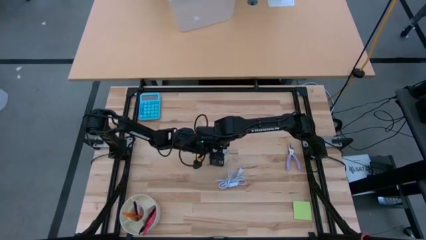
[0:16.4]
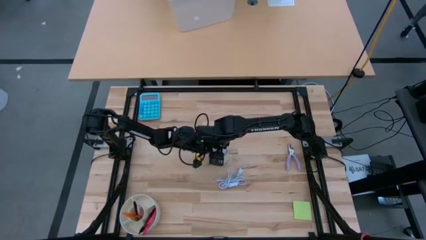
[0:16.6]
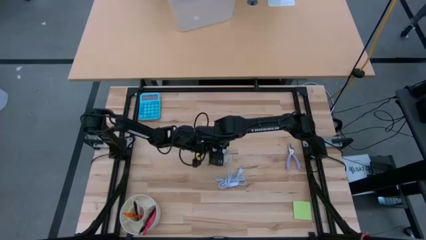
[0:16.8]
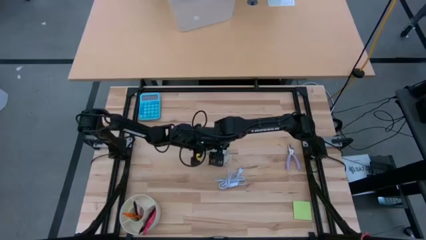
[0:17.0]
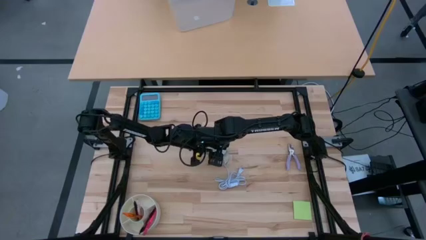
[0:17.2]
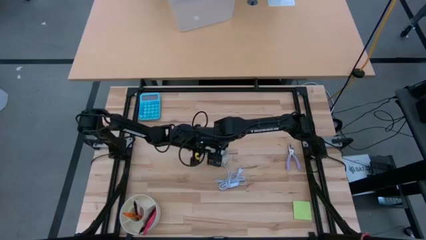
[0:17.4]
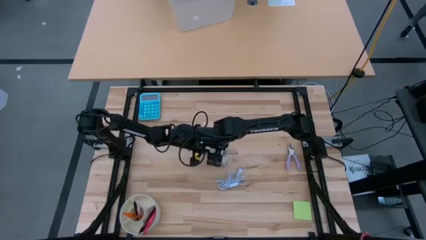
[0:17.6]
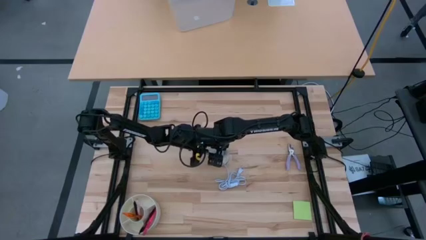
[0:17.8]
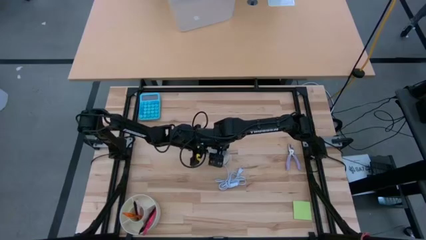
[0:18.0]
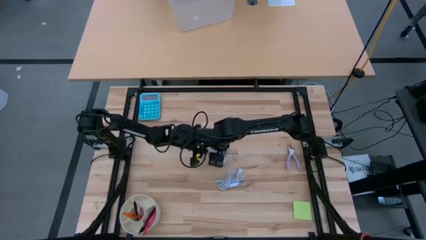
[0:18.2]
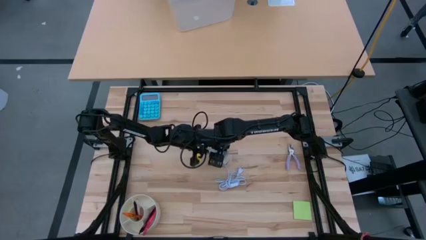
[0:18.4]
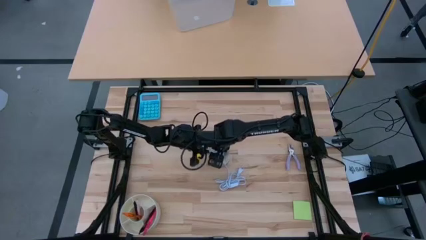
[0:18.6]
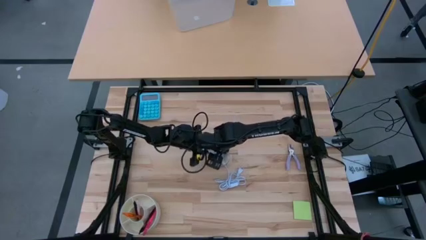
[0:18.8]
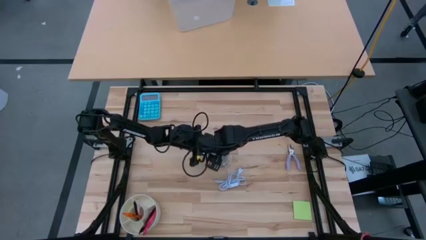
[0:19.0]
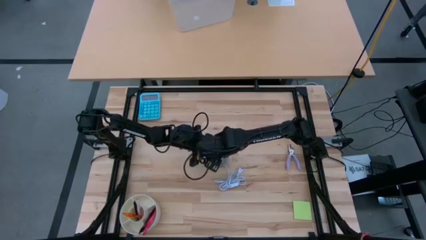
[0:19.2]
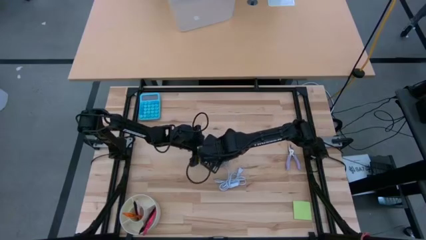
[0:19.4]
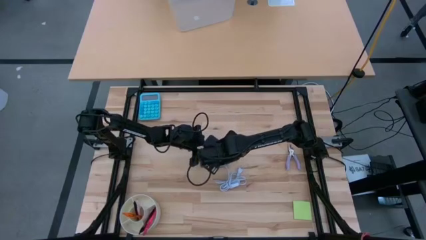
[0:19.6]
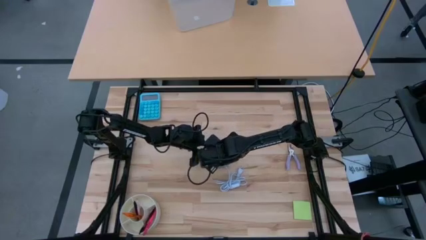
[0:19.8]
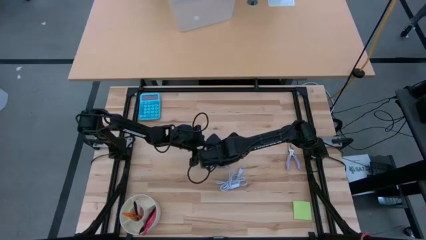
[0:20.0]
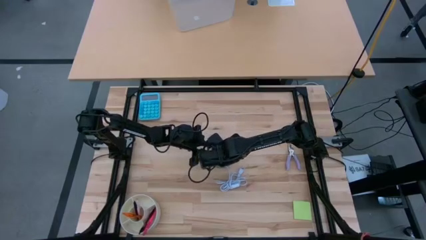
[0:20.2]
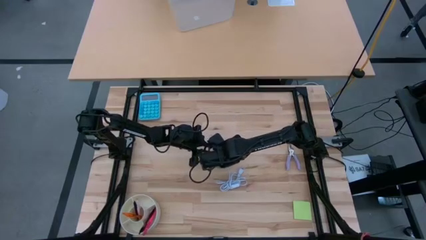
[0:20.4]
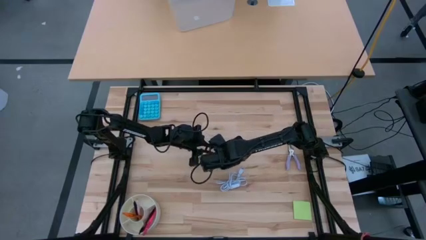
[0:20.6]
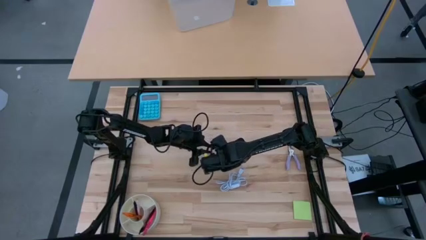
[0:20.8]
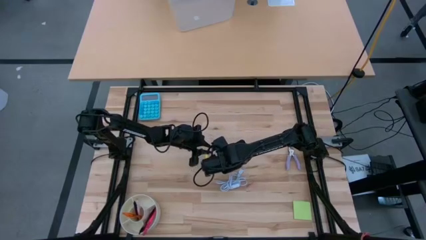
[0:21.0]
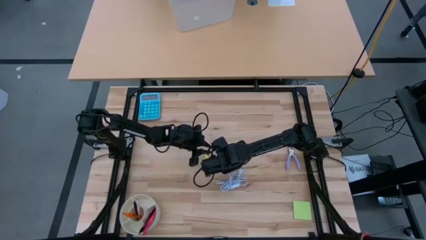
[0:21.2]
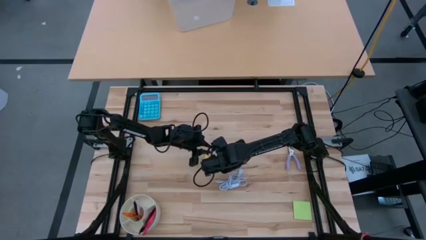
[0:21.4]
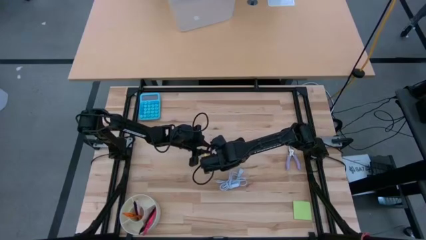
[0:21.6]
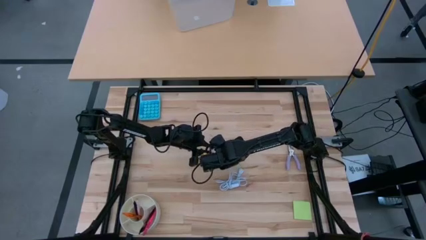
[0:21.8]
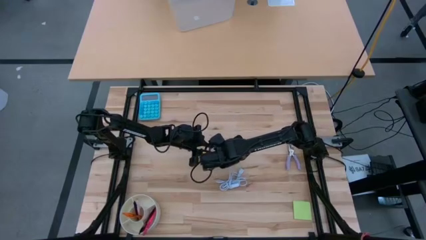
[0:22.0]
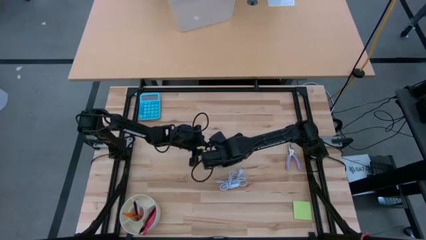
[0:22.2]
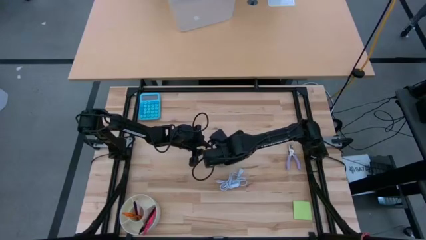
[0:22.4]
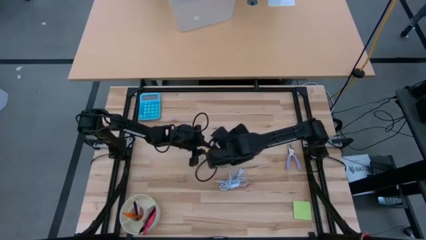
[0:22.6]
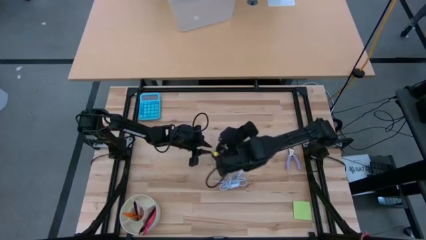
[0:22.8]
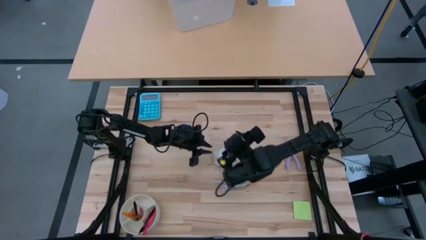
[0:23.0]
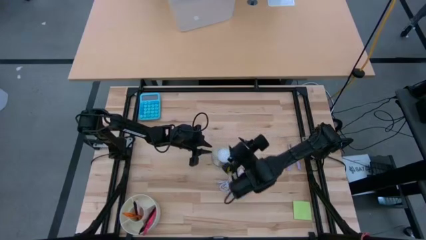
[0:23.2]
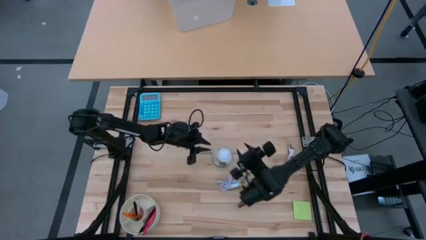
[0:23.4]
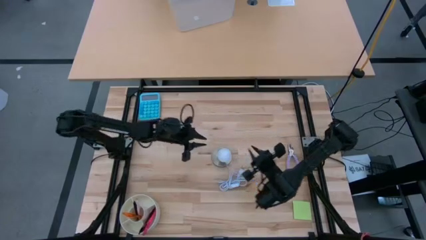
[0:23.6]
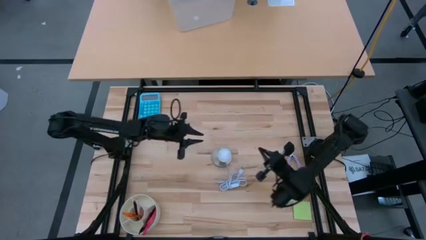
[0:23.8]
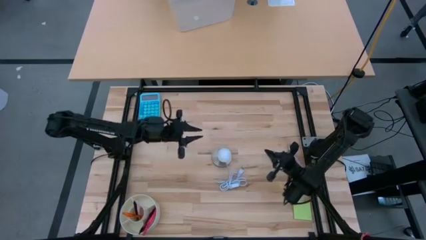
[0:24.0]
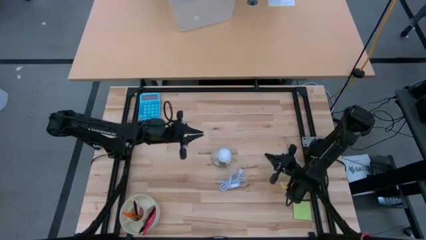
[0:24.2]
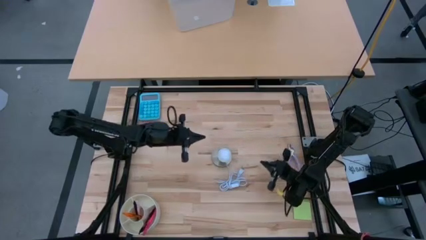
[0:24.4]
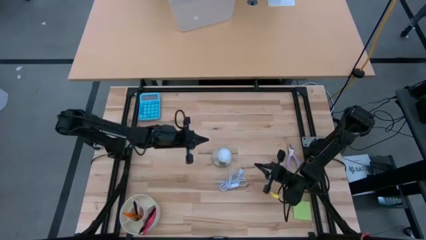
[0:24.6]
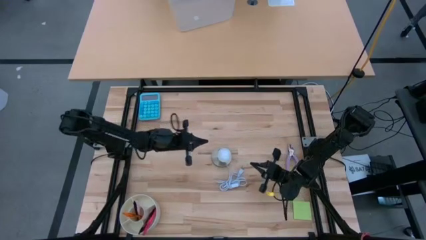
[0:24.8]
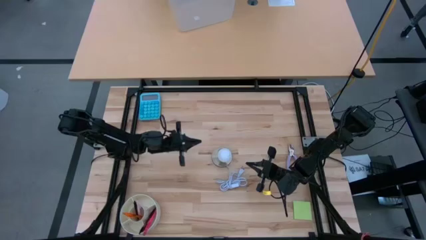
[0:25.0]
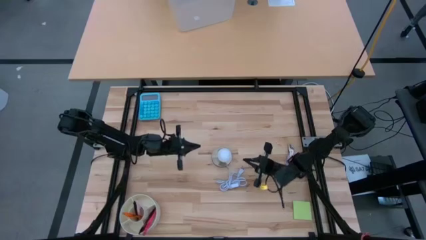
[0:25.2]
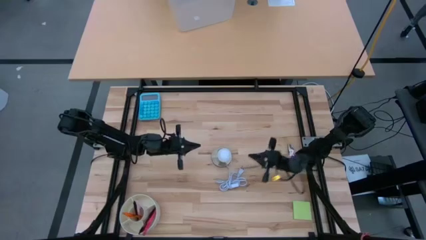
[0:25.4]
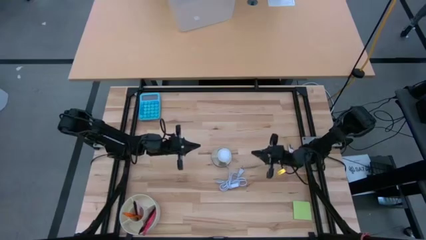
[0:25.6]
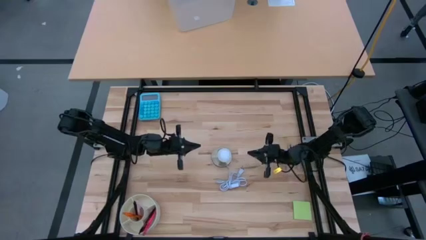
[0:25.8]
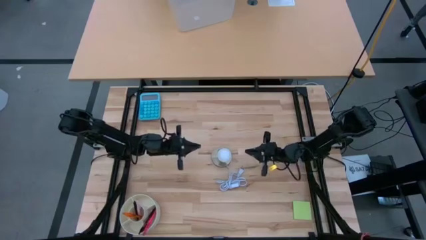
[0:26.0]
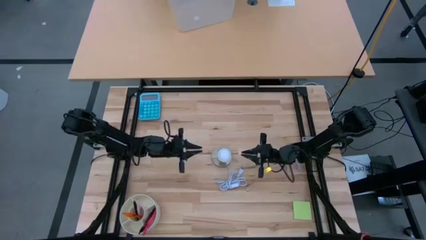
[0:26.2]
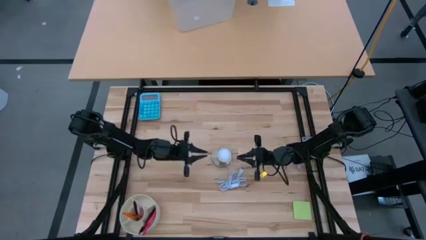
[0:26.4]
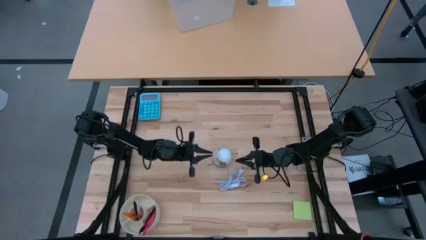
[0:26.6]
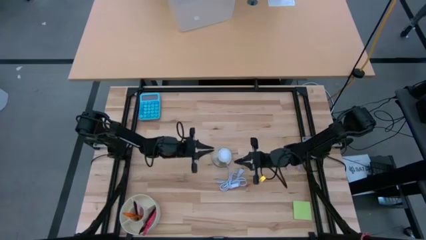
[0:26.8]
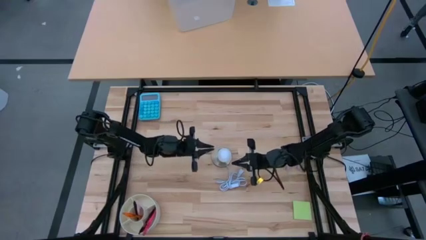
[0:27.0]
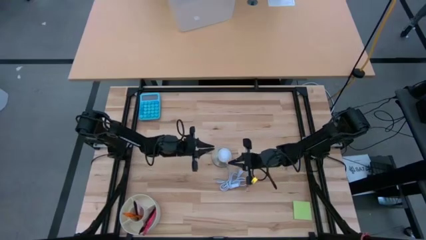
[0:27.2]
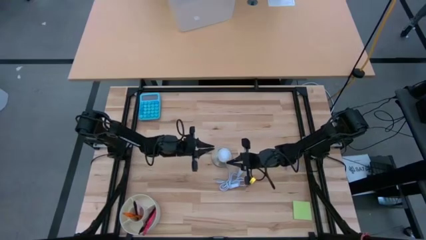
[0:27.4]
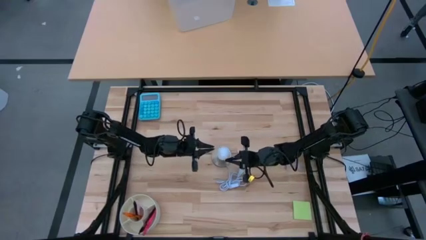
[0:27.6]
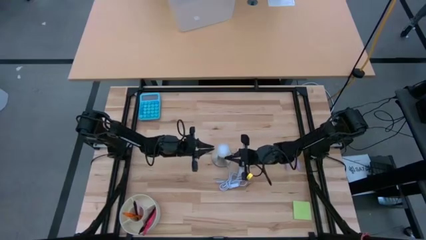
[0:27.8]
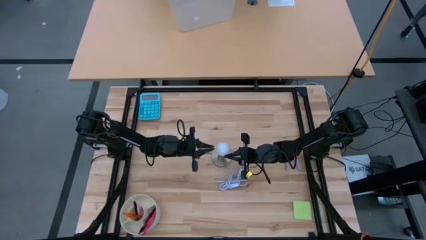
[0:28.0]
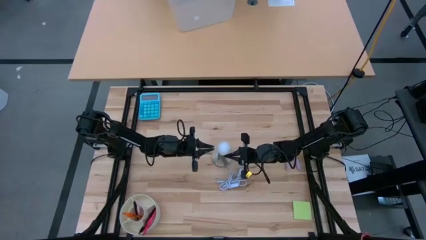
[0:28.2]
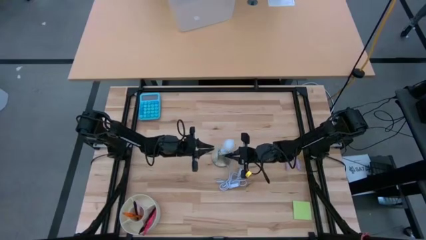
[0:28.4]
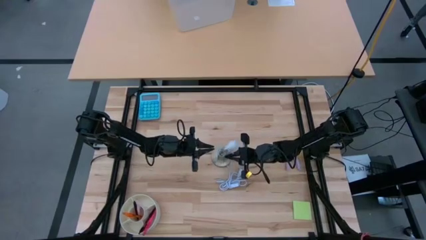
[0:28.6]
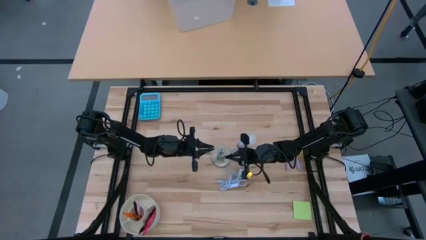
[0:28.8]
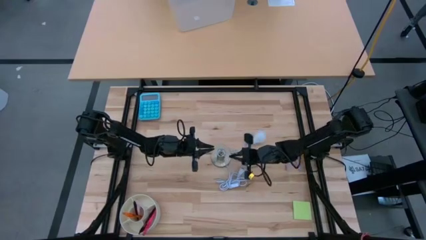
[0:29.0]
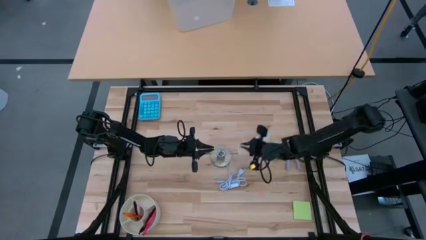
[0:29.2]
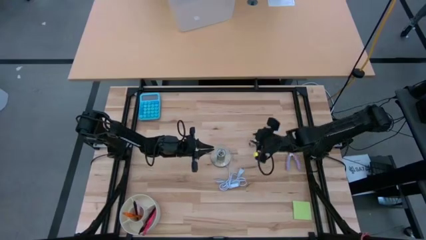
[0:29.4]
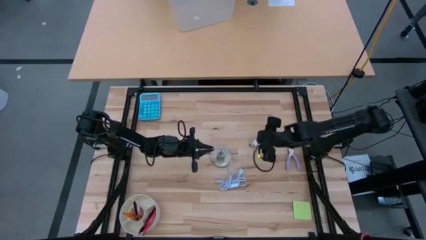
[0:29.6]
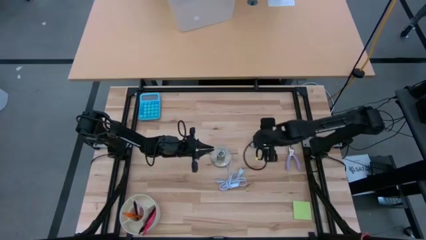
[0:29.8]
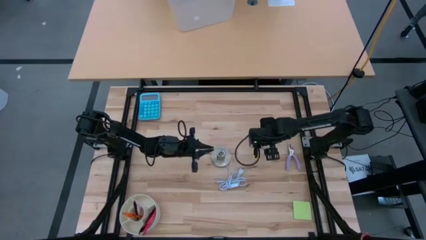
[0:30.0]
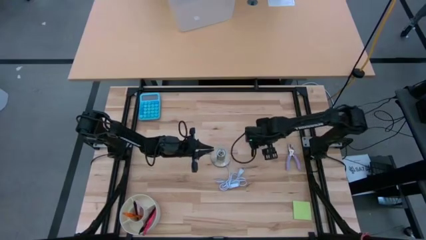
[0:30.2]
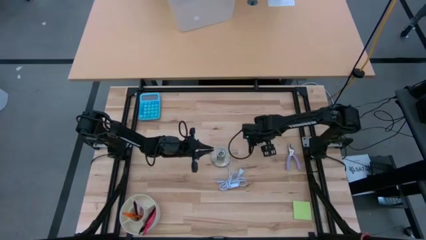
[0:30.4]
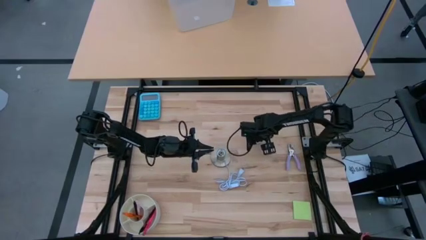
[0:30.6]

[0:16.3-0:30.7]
Task: Screw lightbulb
Insert the light bulb into the lamp
